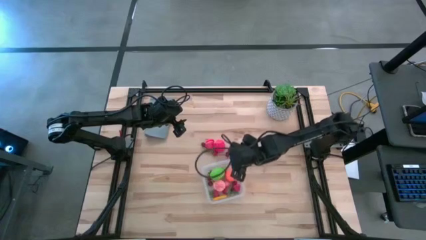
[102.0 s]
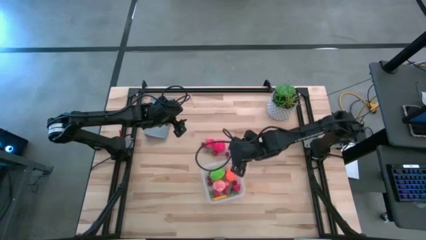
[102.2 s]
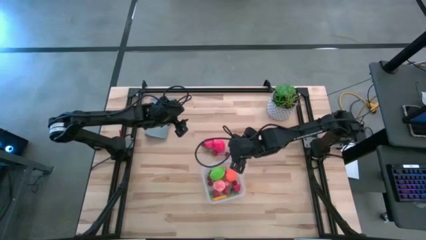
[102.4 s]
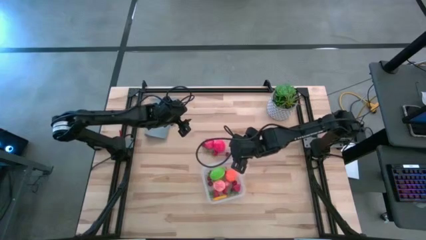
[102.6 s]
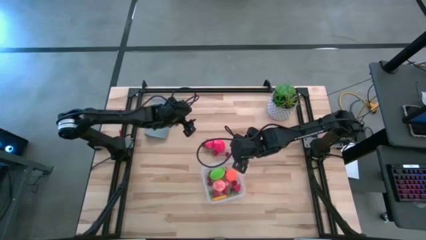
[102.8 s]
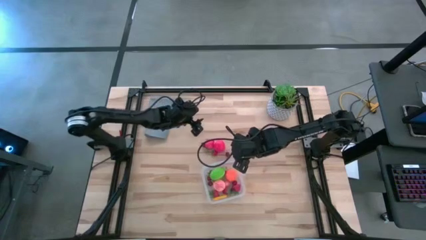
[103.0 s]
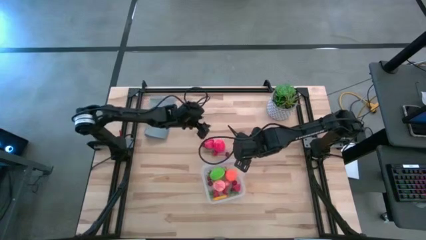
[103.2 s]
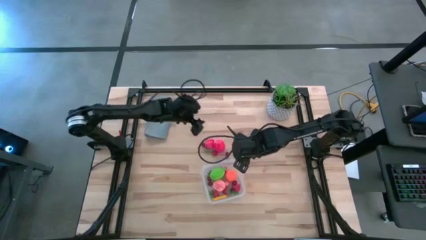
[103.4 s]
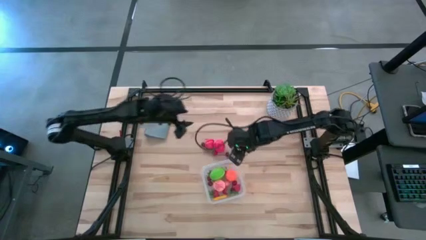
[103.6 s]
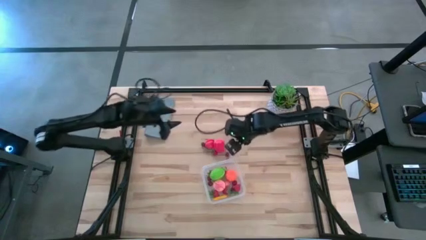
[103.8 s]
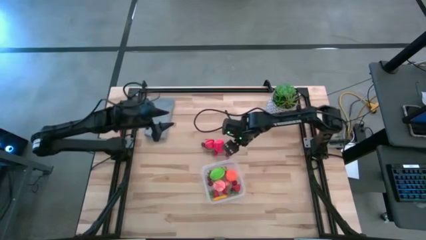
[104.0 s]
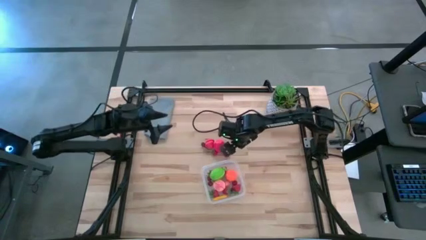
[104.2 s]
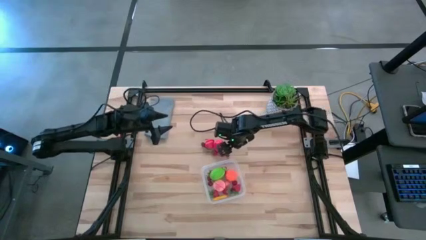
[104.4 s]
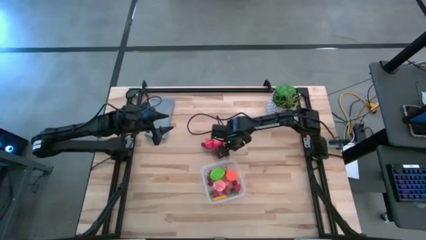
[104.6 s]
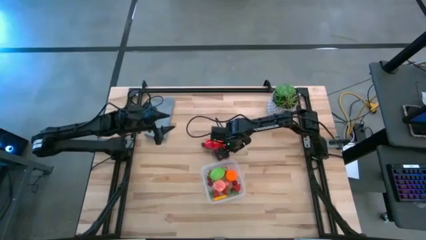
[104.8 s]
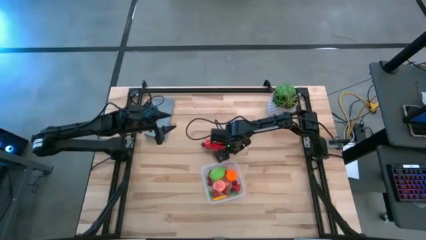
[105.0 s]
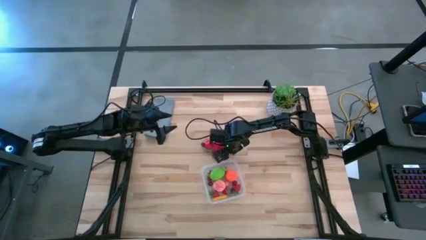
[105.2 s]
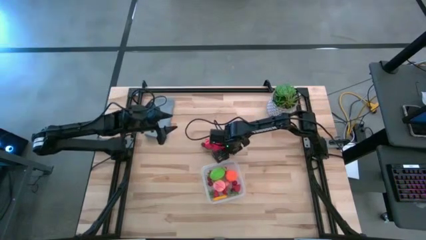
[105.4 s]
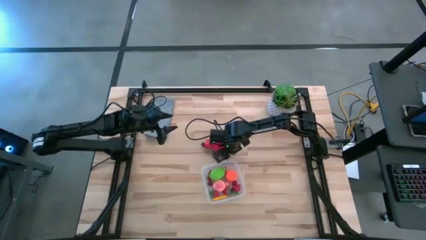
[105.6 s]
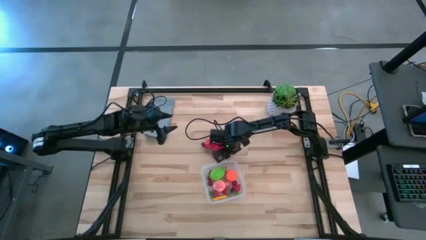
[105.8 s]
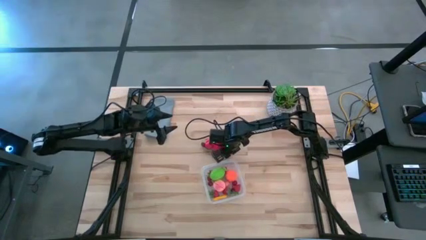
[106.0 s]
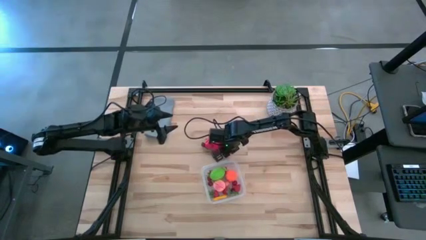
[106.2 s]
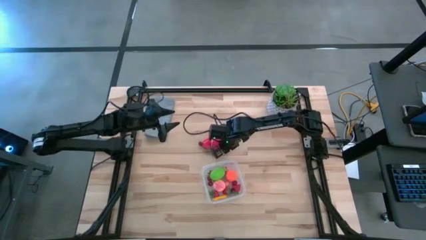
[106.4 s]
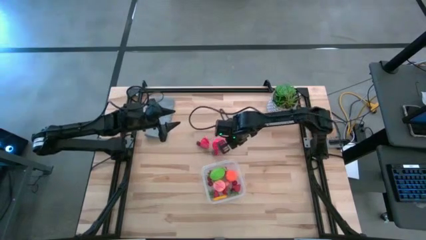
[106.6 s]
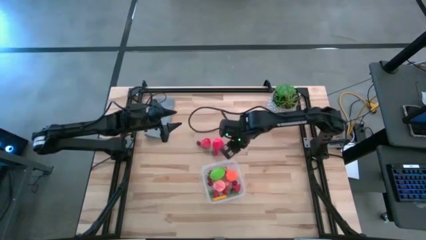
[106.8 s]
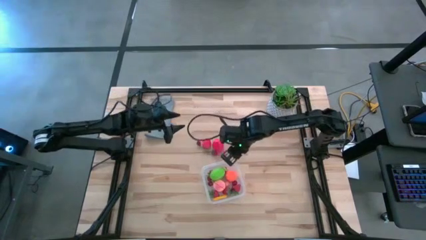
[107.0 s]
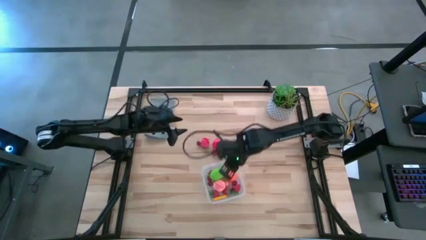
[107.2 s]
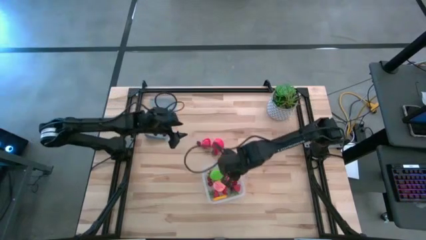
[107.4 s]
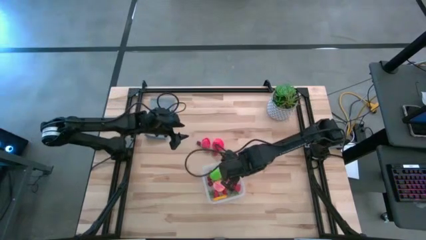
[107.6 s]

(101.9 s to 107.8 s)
Task: Pick and placing Produce into tupperware
Put the red cherry into the transparent bin

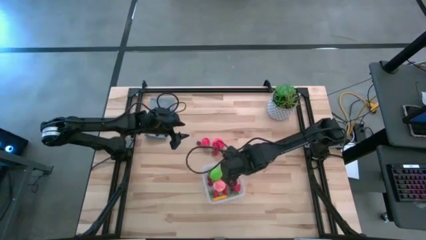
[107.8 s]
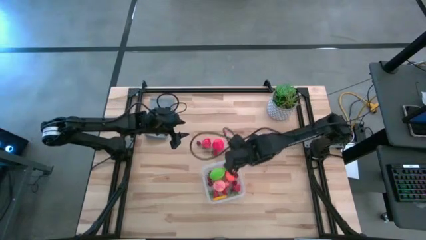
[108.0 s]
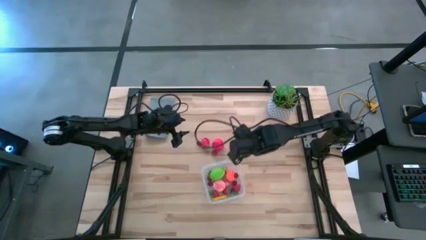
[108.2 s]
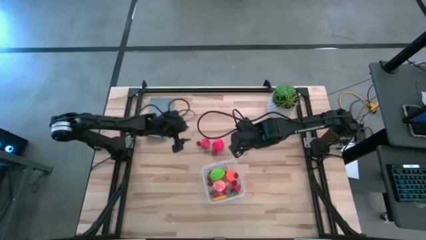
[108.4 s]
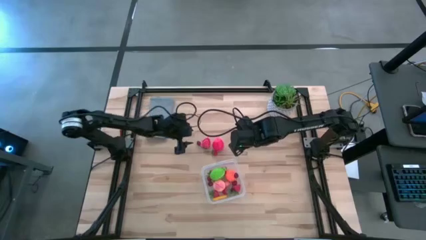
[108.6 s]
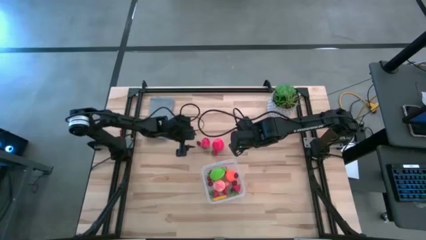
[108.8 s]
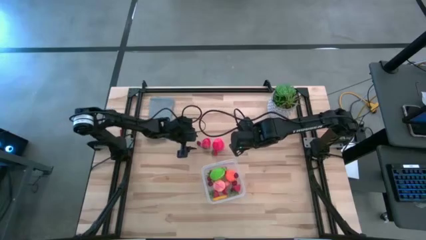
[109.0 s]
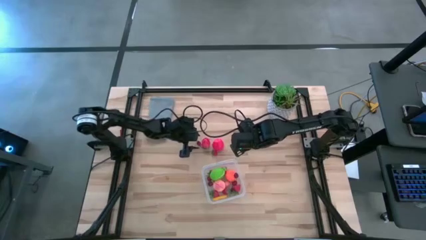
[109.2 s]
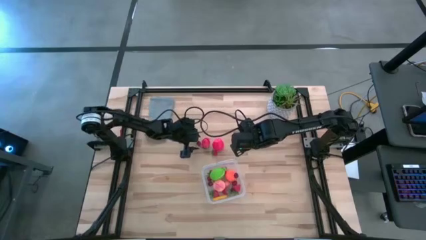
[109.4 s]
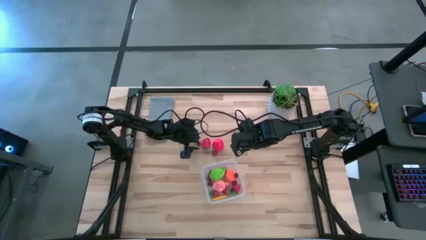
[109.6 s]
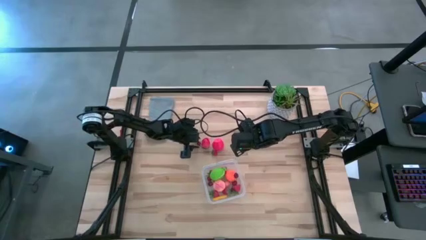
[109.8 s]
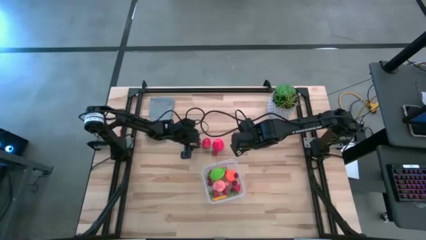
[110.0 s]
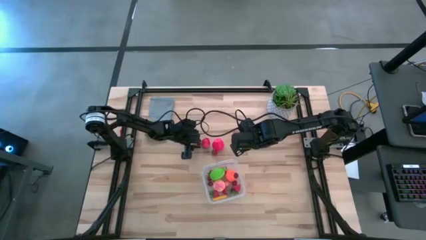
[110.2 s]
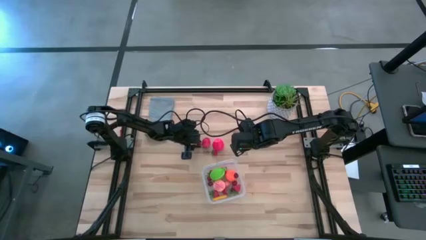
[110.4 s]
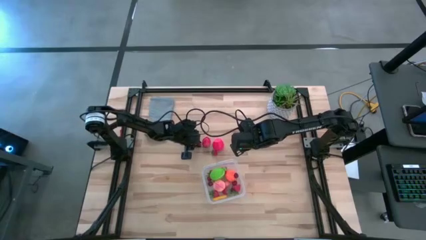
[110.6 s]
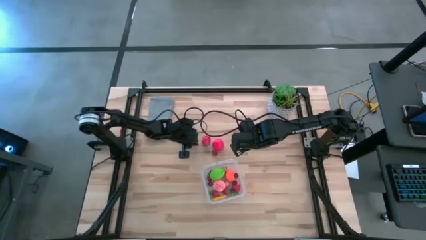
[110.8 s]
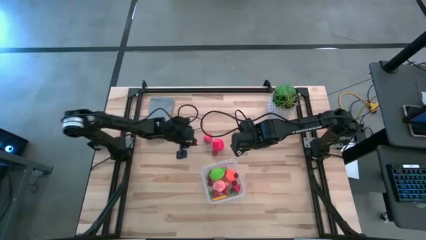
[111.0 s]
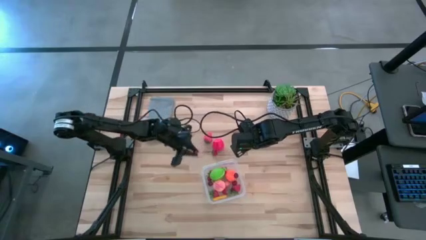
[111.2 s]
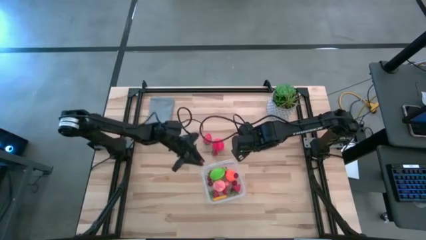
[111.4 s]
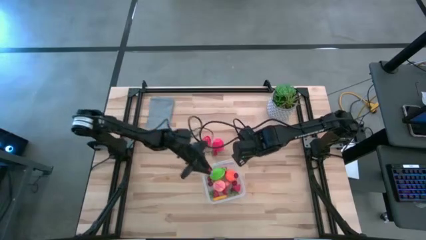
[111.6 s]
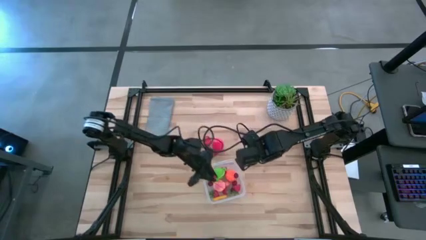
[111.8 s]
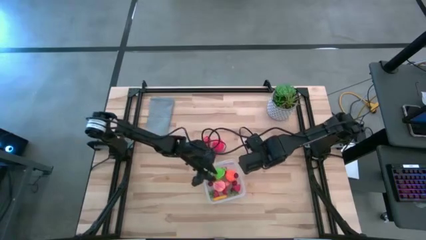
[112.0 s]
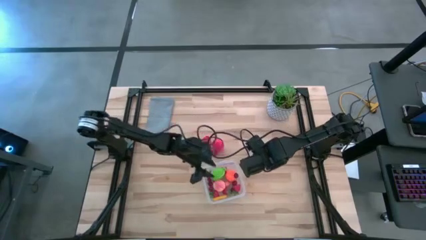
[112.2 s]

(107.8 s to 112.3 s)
Put the red cherry into the transparent bin

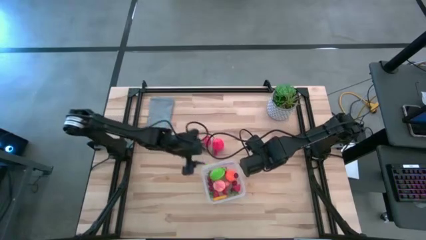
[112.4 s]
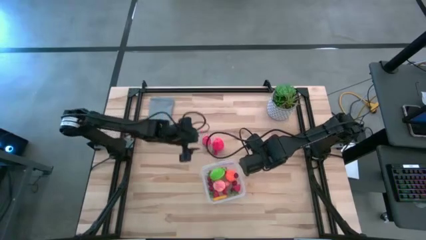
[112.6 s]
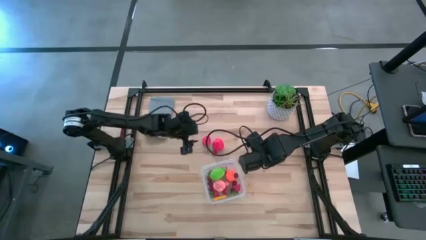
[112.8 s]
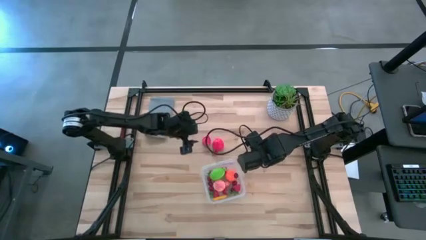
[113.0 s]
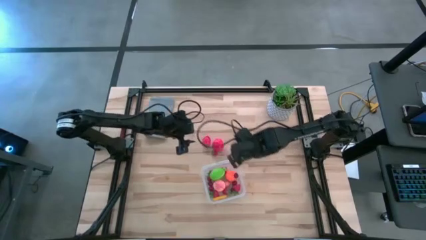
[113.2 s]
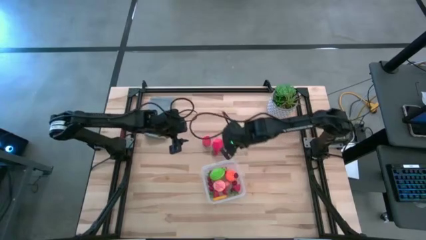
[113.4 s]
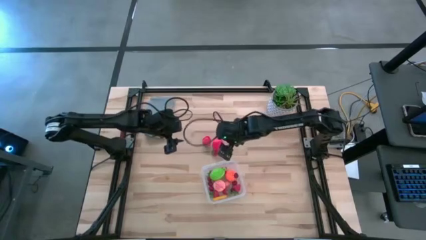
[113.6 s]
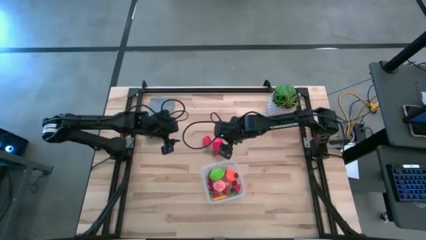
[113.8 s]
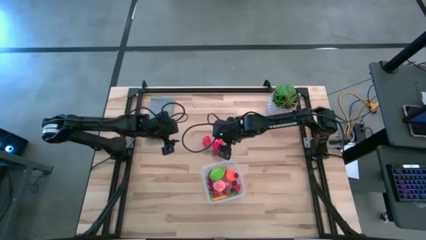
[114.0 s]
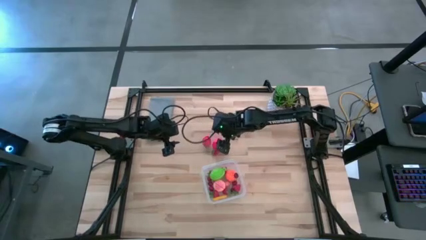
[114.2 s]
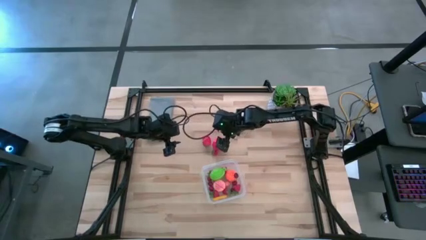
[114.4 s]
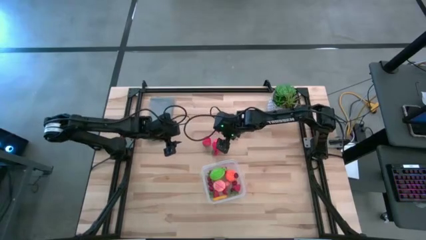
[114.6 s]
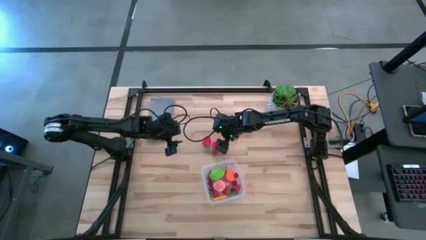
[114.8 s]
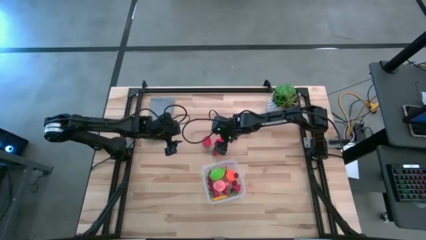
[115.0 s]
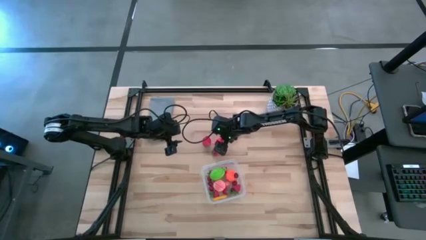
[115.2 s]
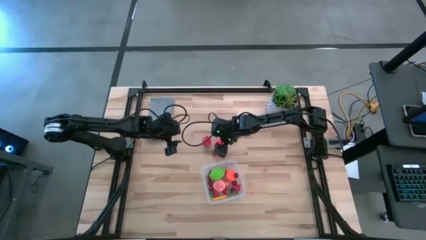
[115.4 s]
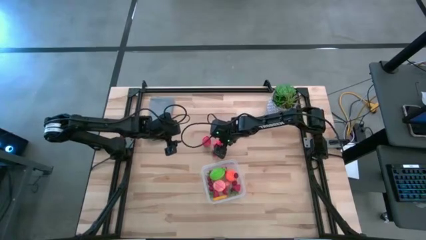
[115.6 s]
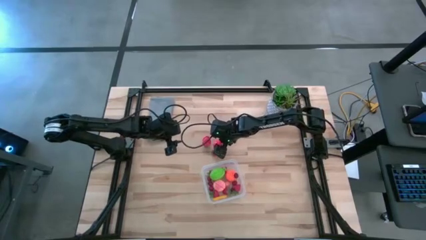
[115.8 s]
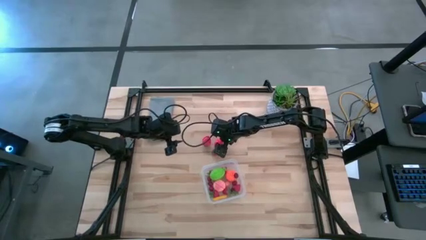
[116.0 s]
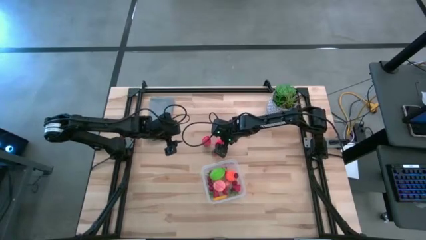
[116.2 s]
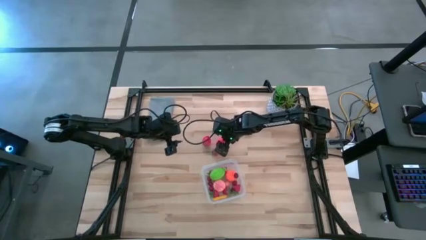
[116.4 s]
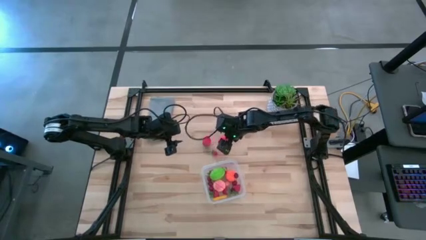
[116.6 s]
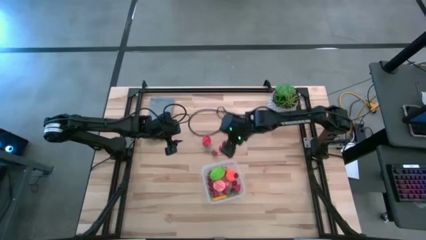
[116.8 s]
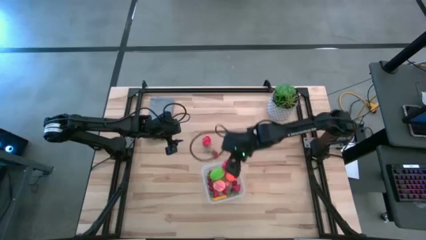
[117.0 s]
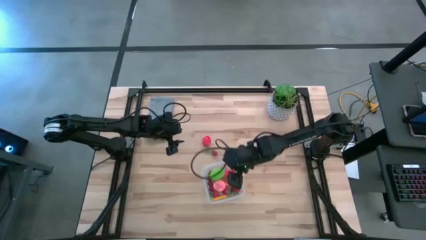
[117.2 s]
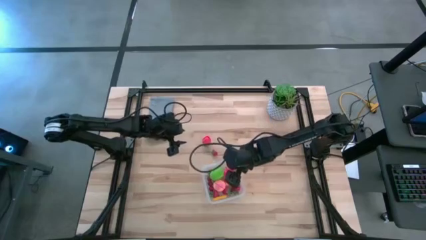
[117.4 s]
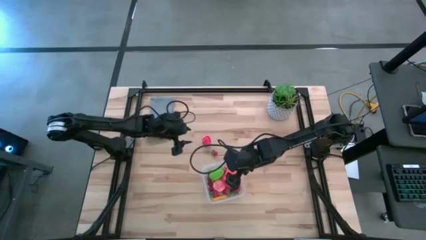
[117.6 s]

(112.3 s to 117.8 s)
Put the red apple into the transparent bin

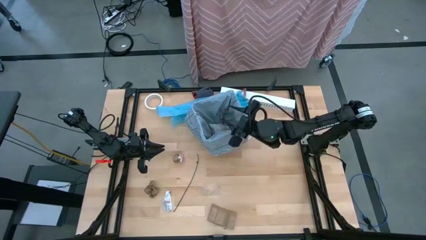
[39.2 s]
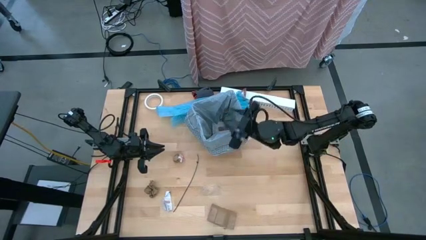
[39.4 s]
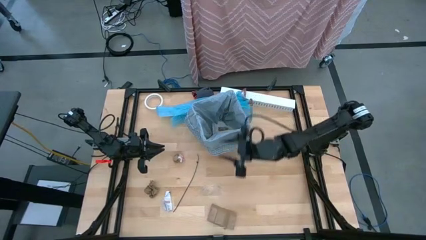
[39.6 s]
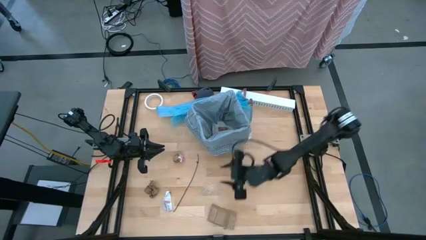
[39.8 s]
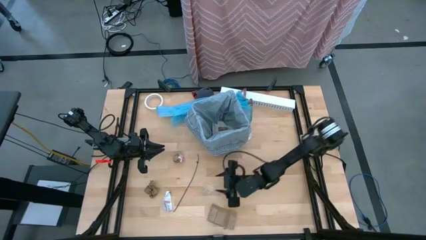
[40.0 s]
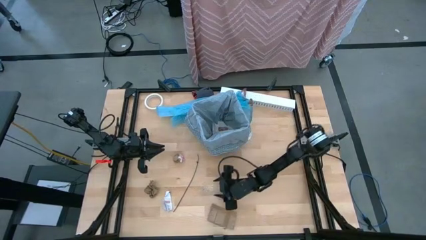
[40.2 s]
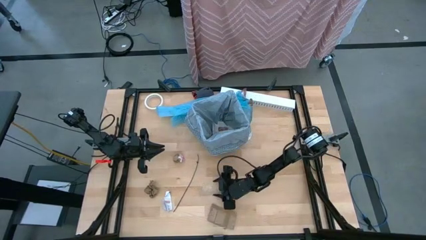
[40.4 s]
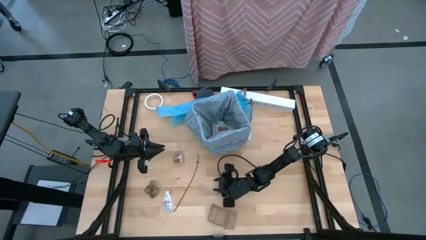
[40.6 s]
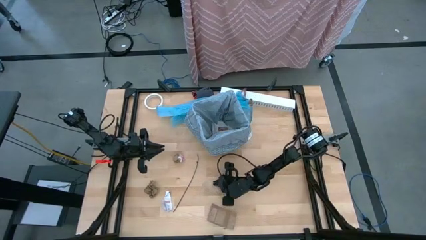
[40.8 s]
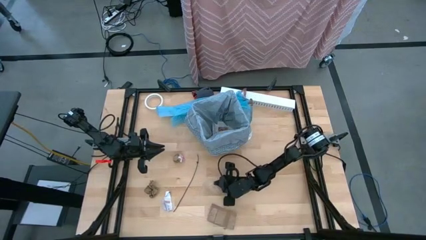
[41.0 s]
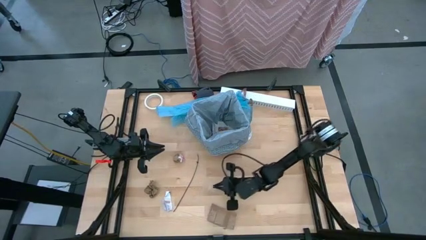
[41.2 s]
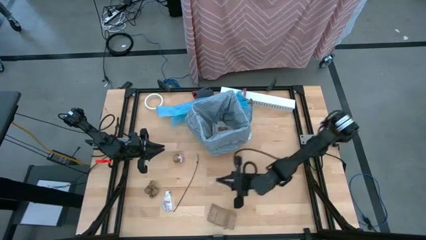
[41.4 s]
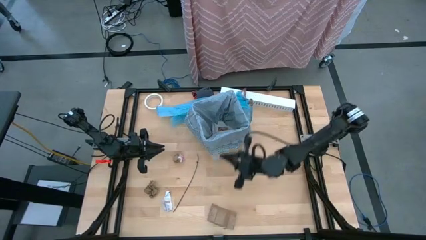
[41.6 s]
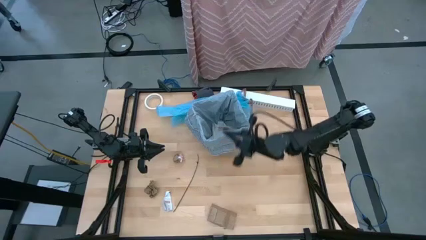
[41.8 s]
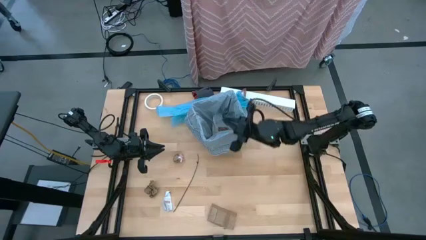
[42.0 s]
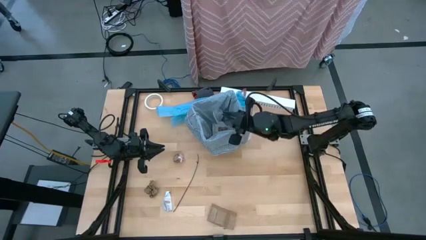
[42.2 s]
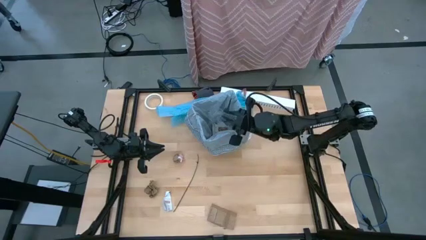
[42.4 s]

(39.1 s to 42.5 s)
Task: place trash/remove bag and relplace
Put the transparent paper inside the black trash bin
